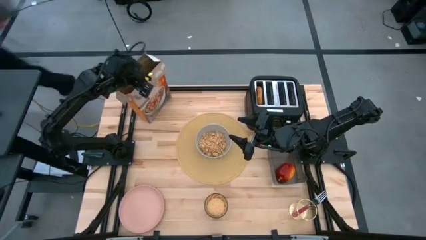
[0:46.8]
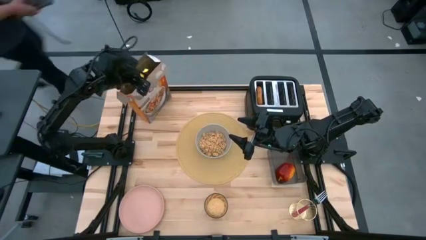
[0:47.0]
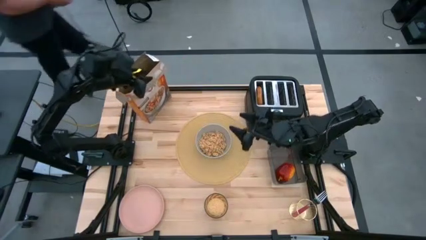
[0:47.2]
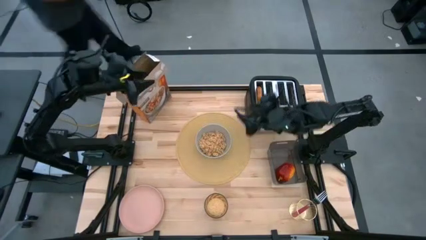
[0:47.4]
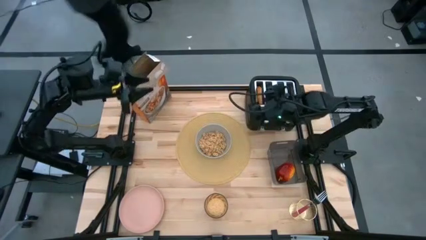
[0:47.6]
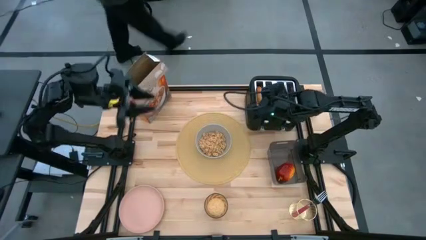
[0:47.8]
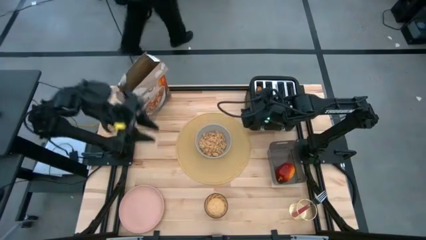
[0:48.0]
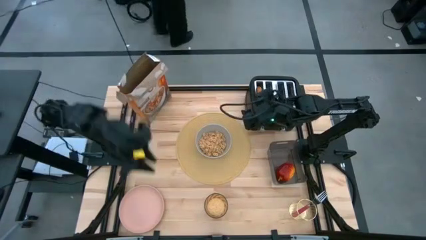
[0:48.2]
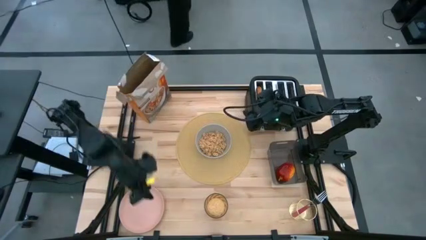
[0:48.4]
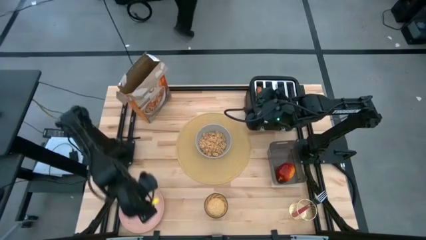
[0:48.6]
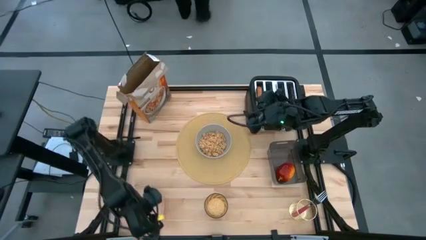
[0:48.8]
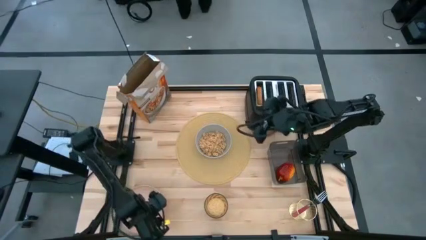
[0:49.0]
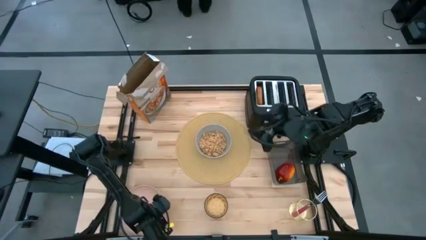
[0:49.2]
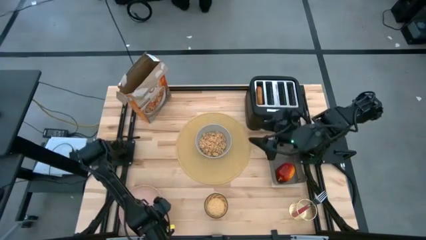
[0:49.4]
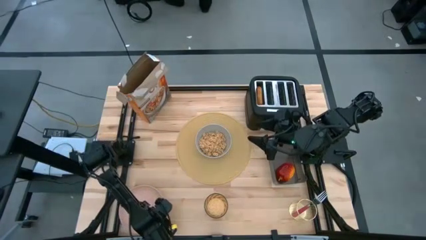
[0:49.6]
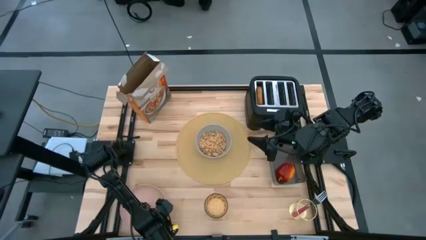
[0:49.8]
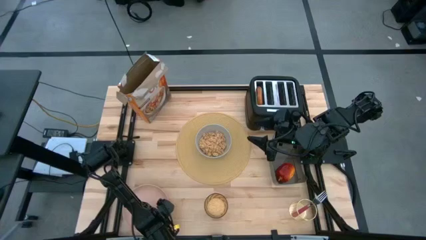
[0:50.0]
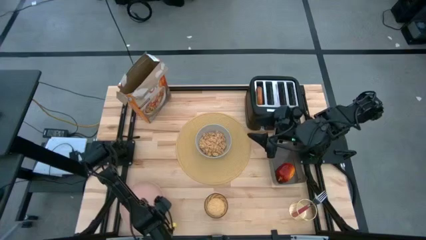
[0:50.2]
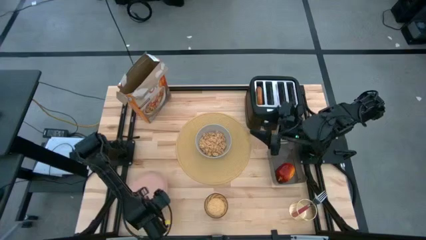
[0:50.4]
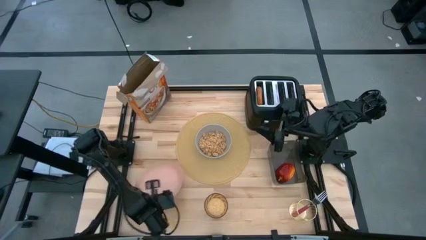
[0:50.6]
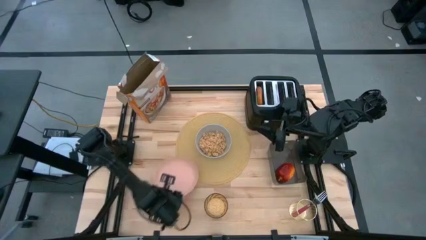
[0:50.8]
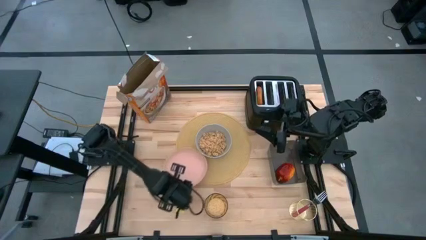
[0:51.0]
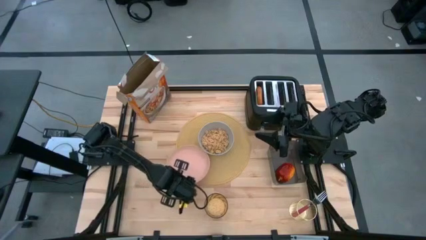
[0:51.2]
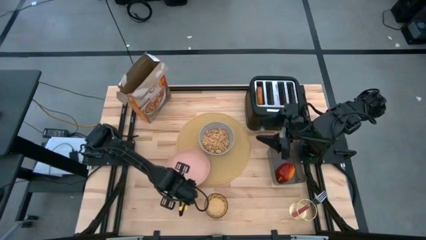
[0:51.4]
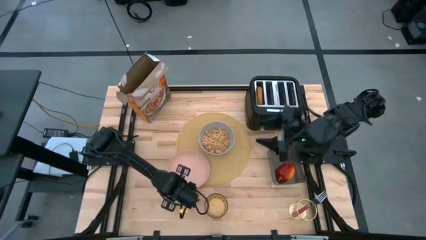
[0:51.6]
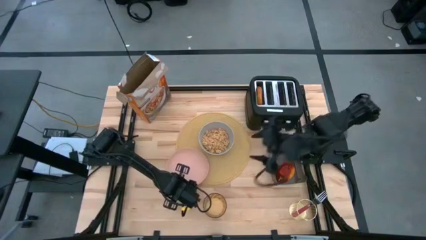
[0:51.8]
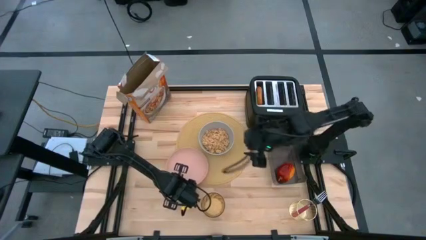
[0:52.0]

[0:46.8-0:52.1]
Task: Arrange a breakfast setting
Put the pink plate on the brown place mat

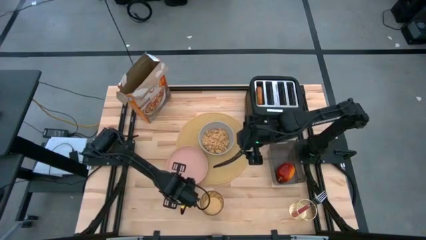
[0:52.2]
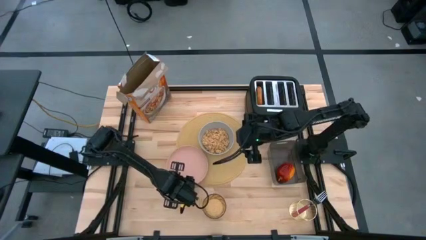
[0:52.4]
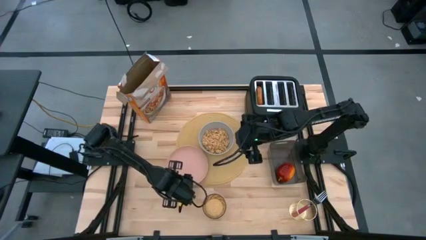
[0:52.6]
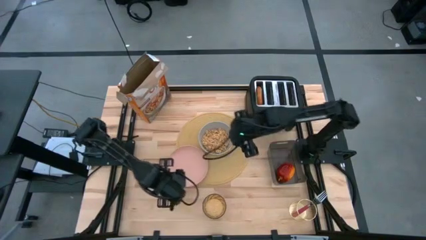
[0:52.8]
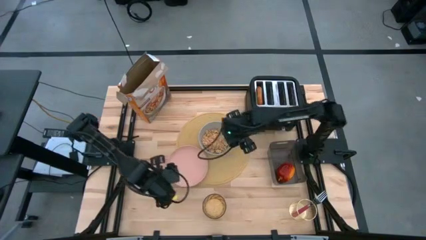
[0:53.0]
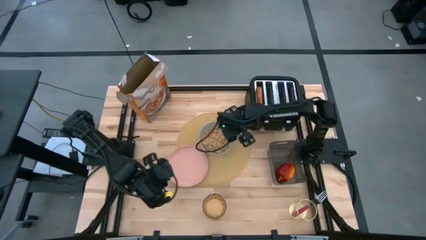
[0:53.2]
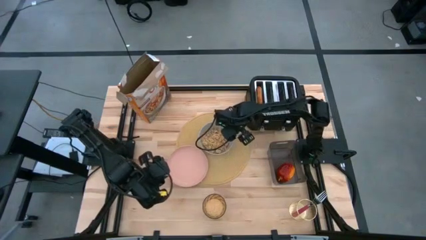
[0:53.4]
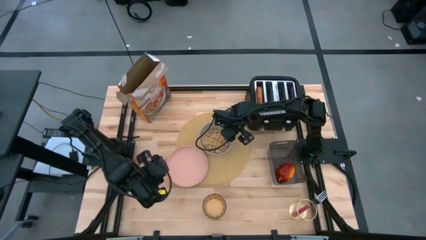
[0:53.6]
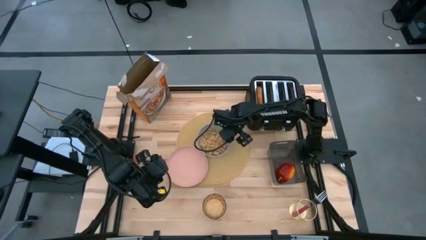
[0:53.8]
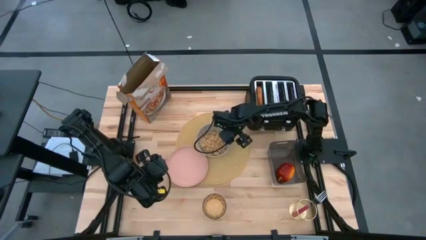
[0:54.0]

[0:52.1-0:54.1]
Adjust the gray bowl

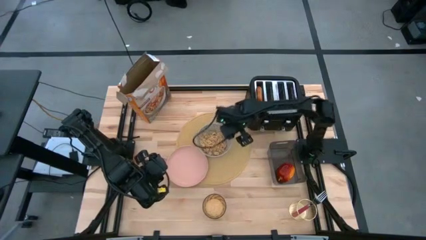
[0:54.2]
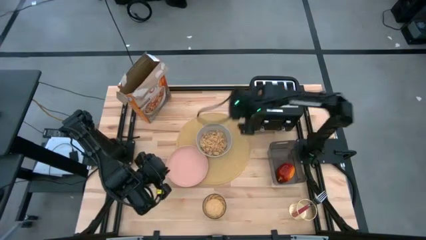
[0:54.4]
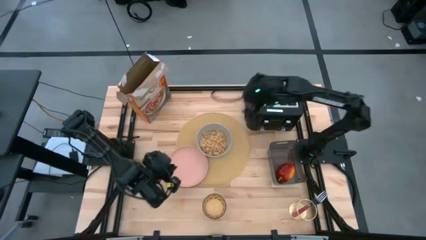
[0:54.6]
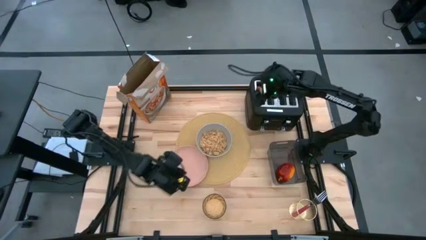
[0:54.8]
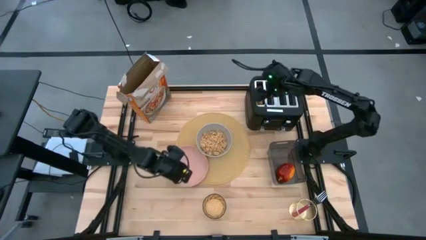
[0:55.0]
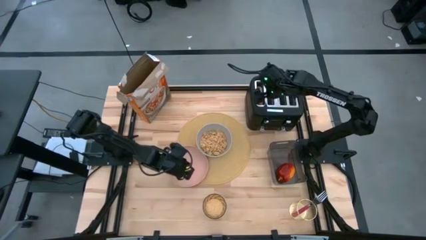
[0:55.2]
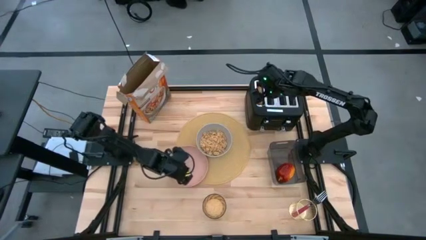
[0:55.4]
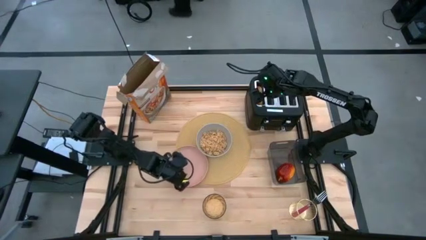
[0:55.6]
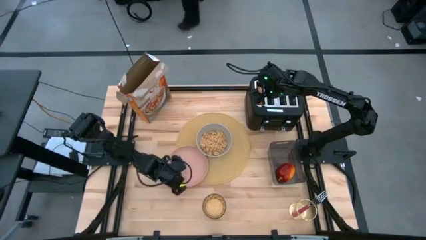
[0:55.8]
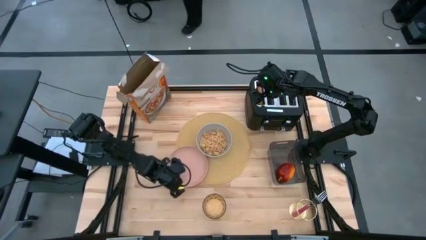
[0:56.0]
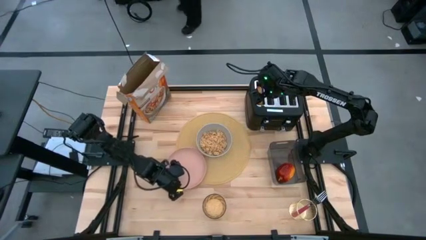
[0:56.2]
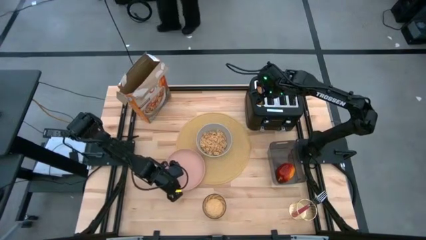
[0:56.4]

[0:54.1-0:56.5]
Adjust the pink plate

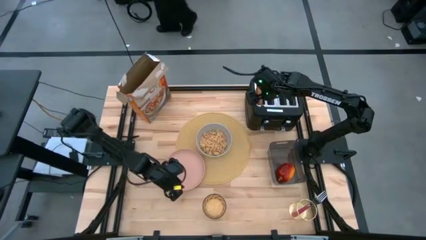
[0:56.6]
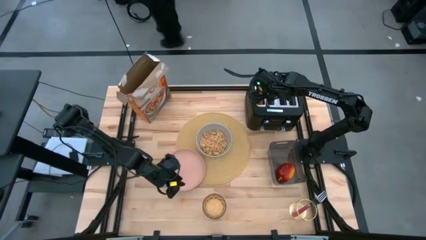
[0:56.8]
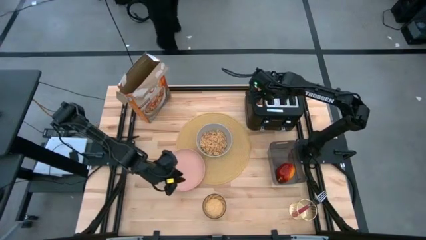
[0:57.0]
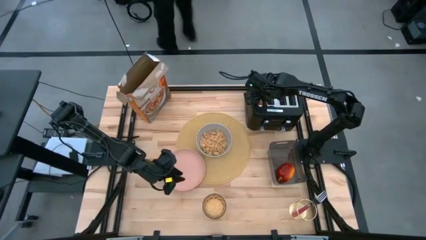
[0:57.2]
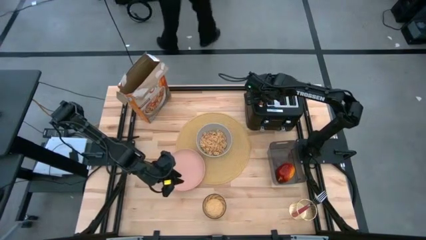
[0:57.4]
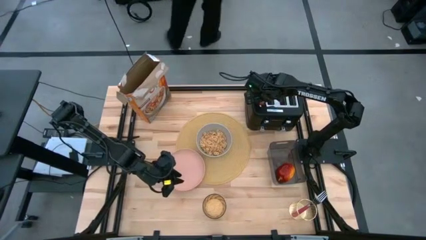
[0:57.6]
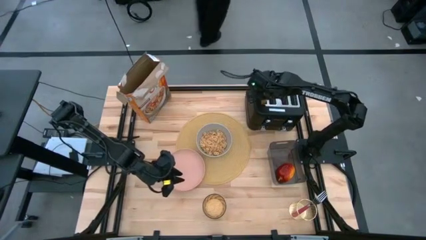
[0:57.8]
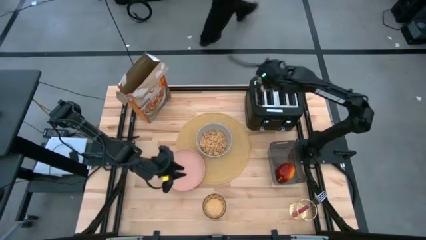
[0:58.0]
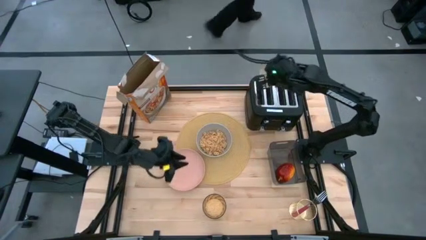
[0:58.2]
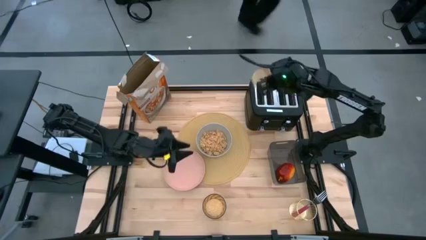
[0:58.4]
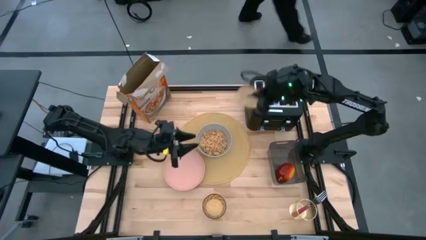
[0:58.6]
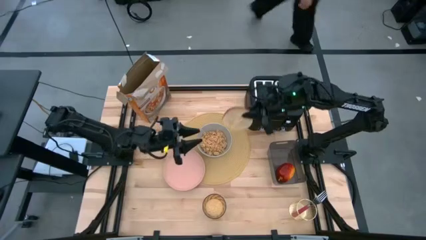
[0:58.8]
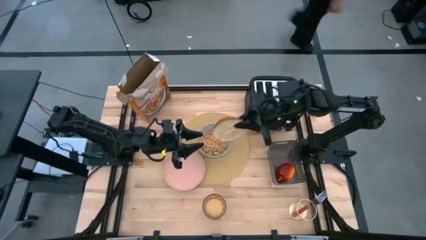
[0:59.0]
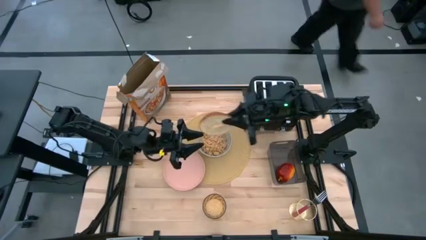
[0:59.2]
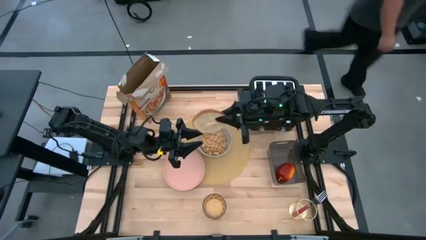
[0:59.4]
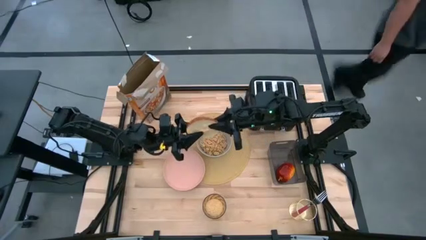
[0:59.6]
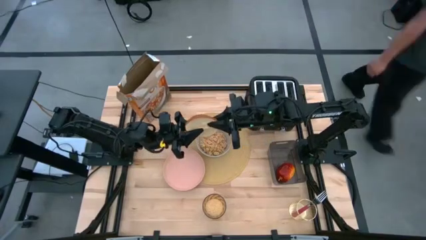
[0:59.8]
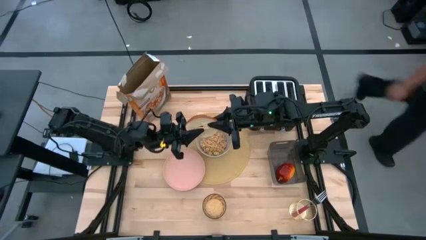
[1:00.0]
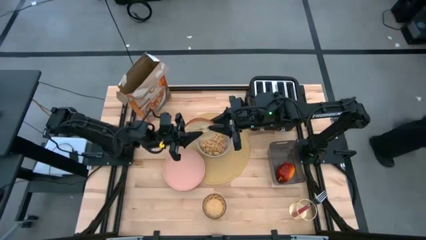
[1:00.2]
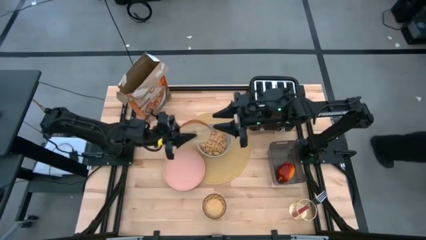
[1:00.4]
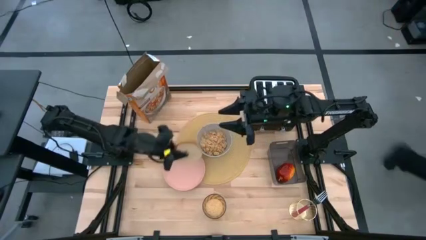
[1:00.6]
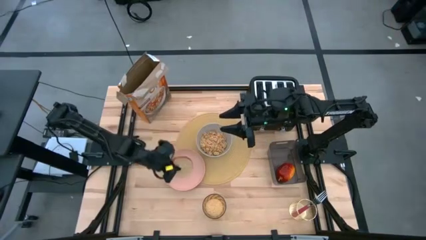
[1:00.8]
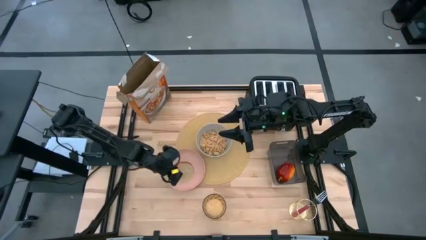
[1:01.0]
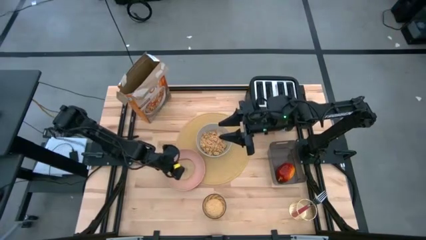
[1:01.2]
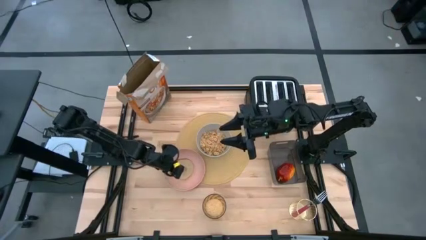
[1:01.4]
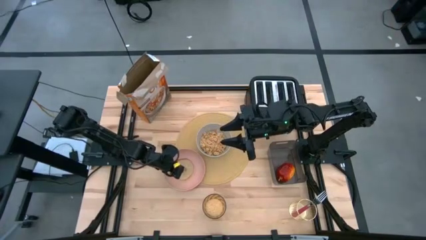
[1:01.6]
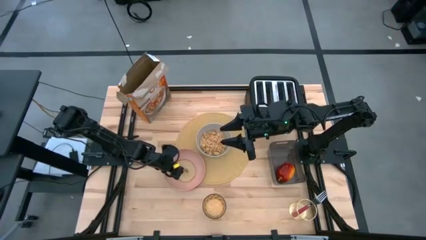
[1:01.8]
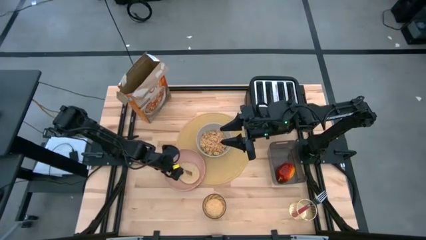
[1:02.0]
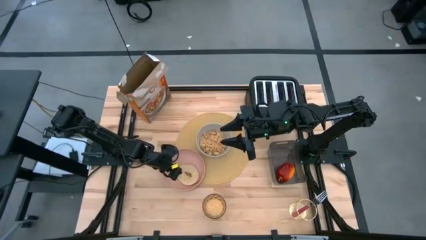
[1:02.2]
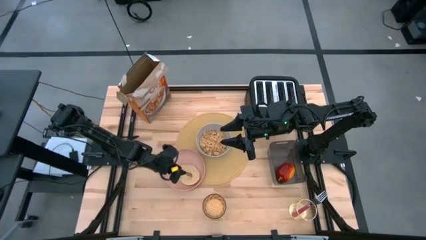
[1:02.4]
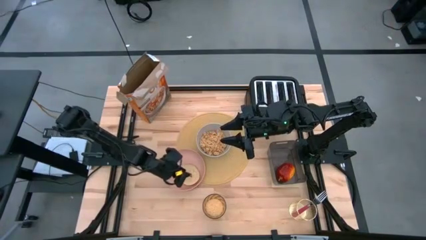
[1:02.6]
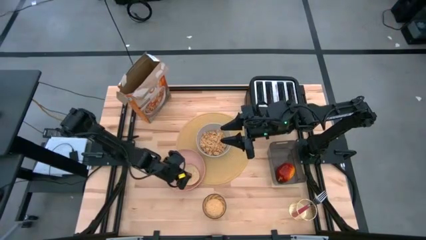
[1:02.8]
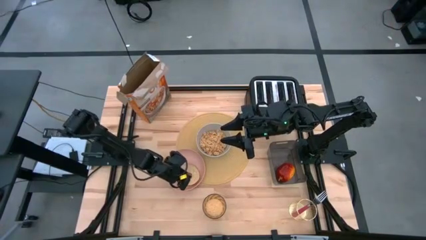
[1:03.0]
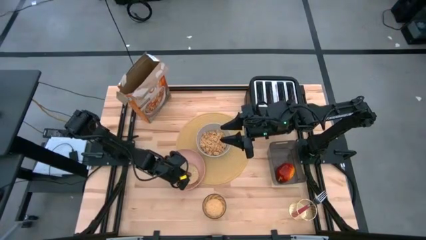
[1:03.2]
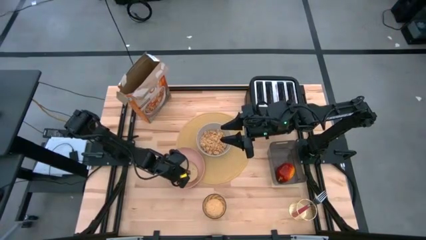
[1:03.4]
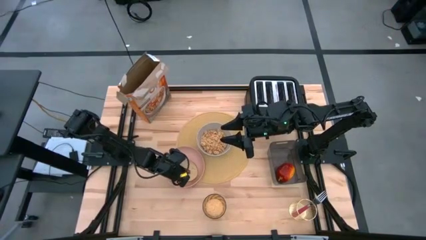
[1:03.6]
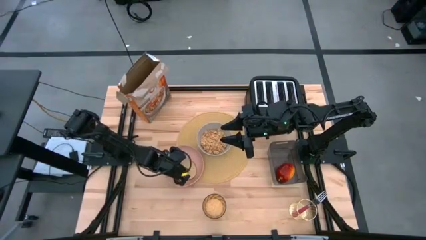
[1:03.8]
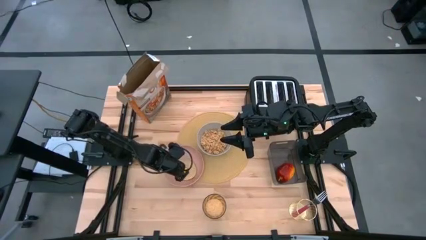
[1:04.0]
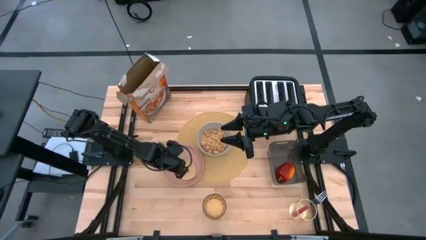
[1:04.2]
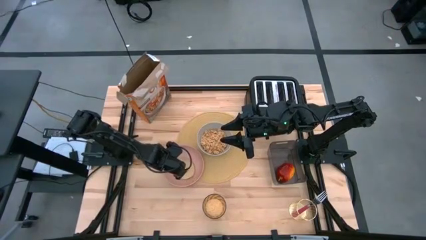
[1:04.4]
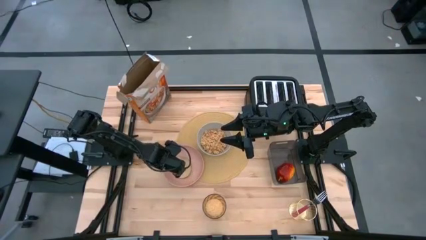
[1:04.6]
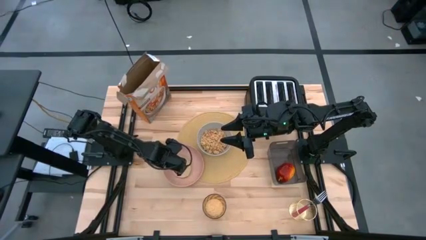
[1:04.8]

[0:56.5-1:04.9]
Put the bagel on the pink plate
